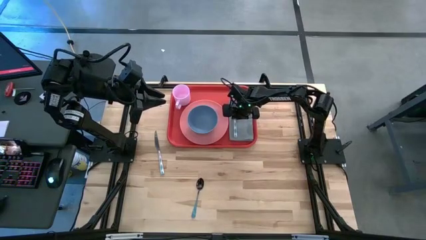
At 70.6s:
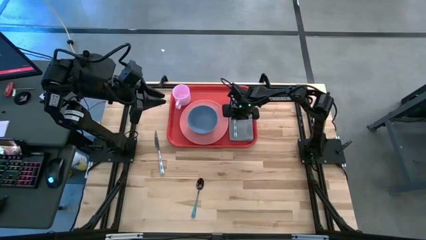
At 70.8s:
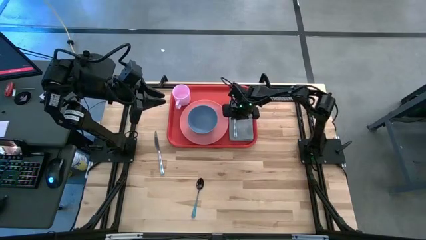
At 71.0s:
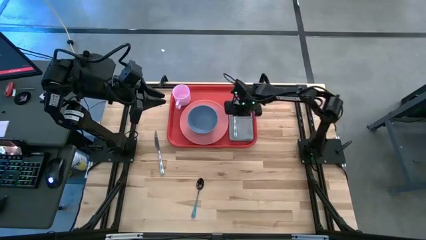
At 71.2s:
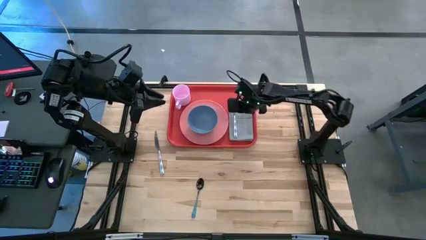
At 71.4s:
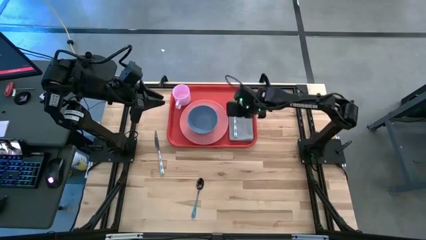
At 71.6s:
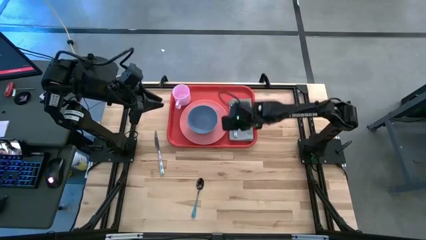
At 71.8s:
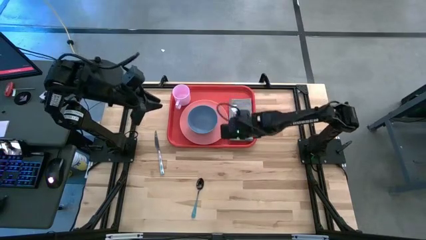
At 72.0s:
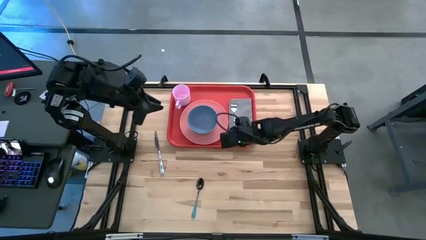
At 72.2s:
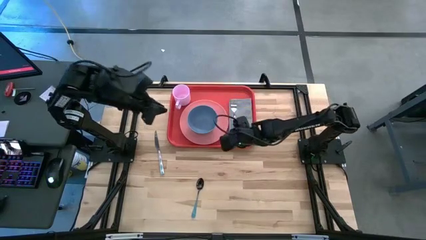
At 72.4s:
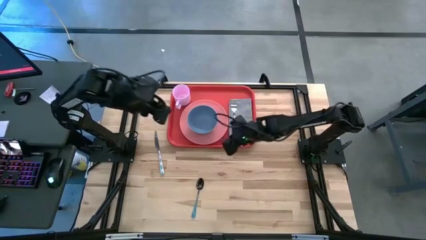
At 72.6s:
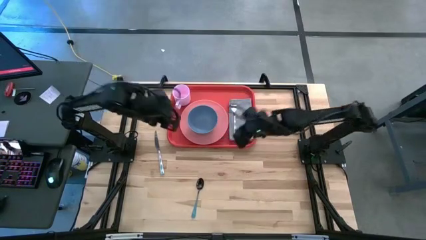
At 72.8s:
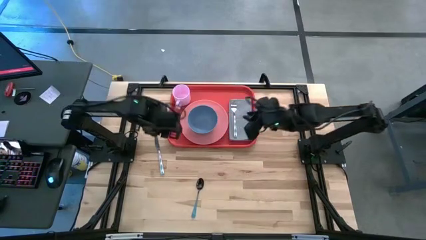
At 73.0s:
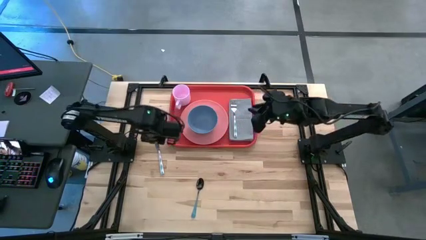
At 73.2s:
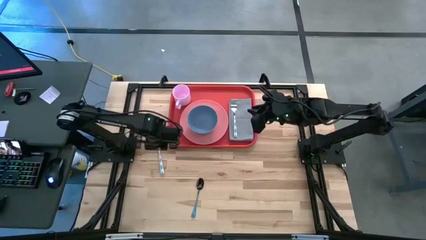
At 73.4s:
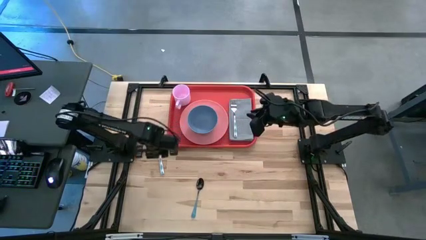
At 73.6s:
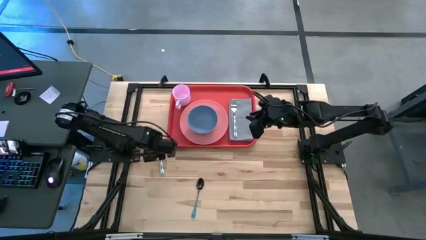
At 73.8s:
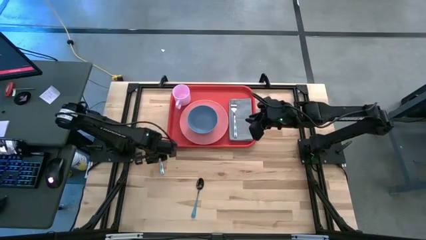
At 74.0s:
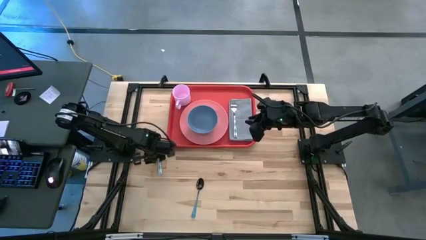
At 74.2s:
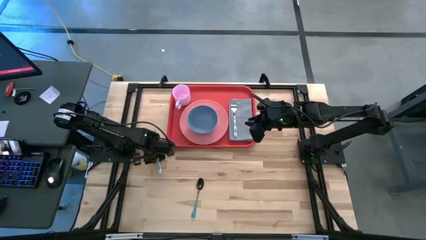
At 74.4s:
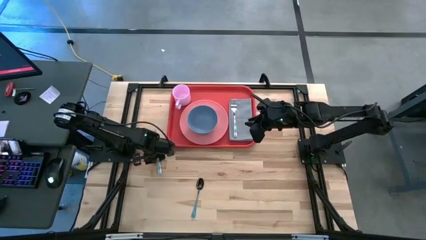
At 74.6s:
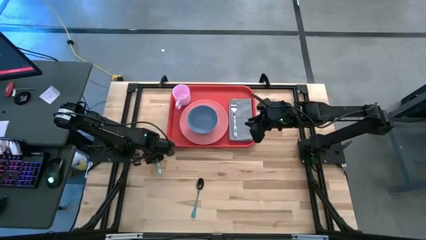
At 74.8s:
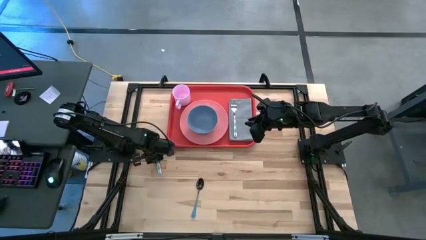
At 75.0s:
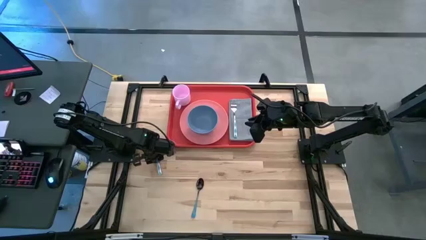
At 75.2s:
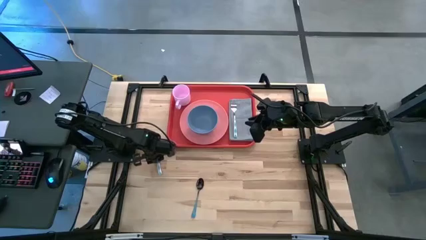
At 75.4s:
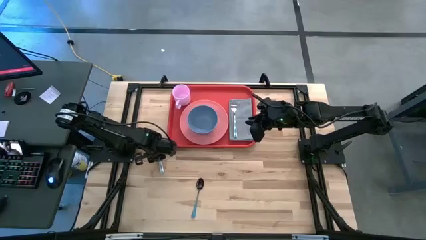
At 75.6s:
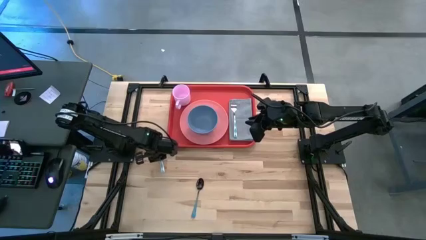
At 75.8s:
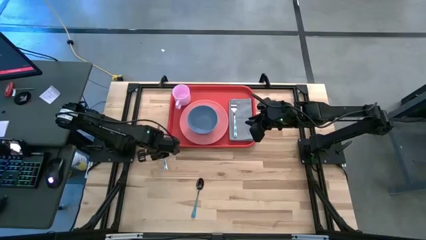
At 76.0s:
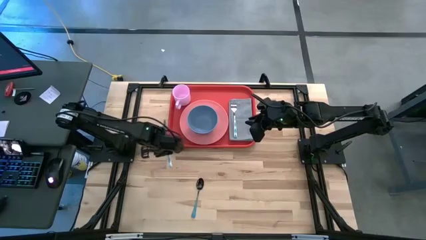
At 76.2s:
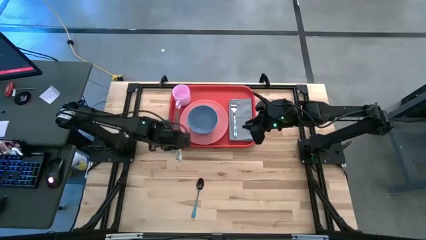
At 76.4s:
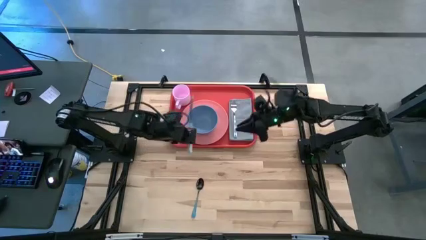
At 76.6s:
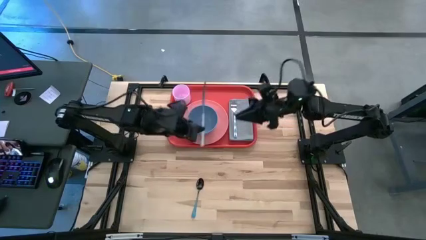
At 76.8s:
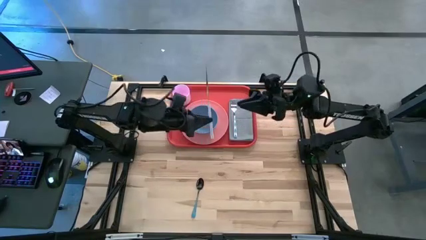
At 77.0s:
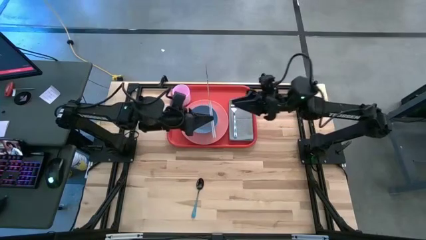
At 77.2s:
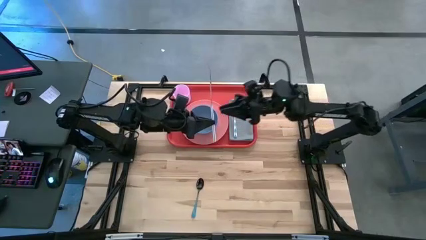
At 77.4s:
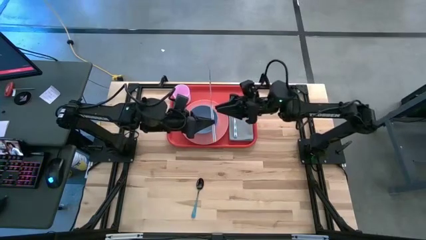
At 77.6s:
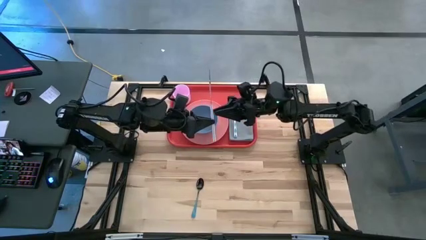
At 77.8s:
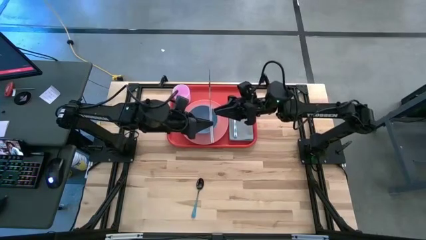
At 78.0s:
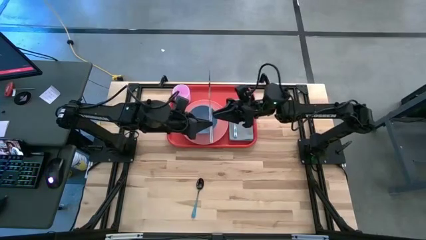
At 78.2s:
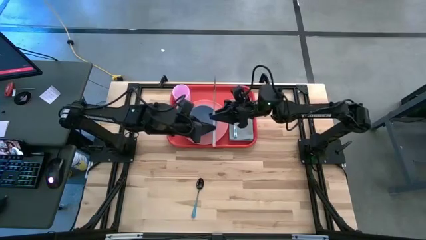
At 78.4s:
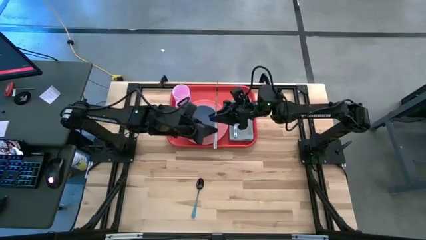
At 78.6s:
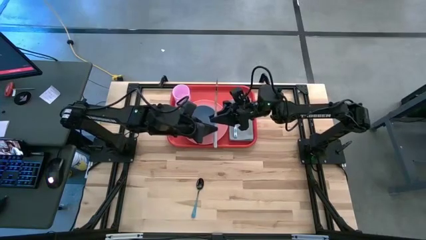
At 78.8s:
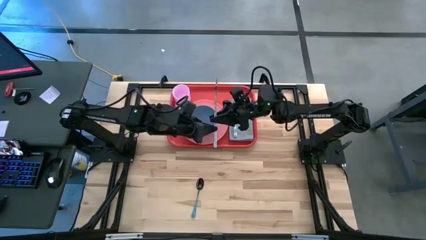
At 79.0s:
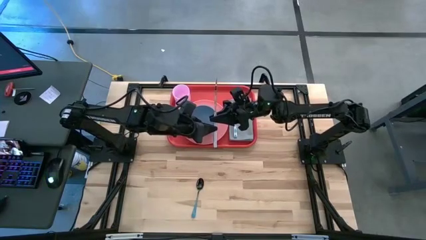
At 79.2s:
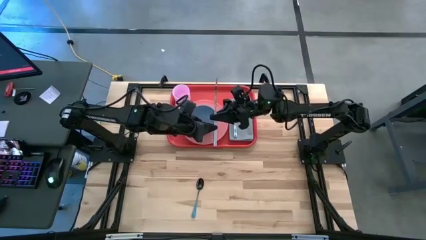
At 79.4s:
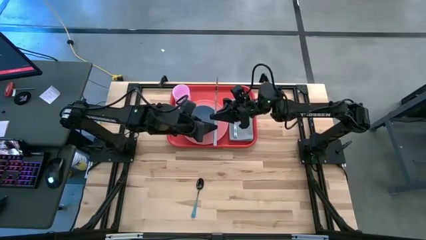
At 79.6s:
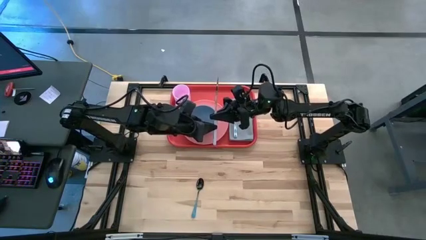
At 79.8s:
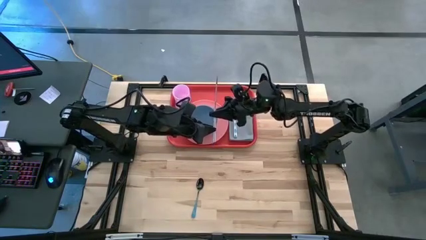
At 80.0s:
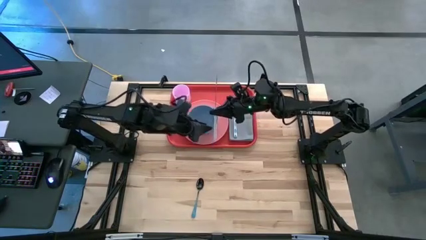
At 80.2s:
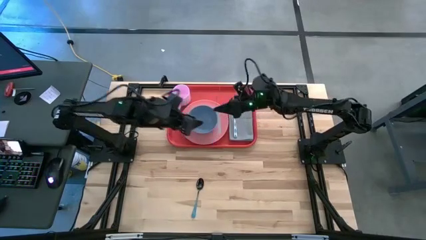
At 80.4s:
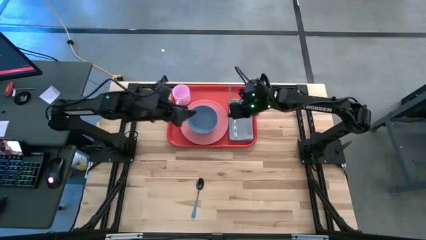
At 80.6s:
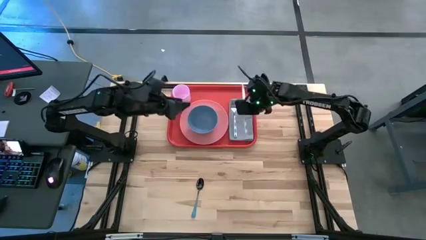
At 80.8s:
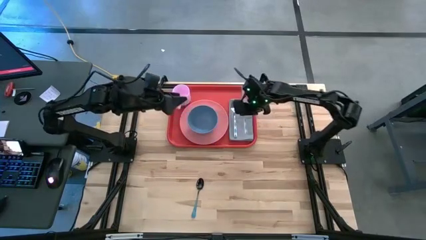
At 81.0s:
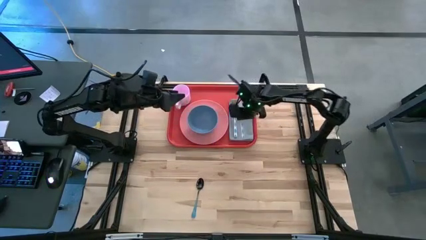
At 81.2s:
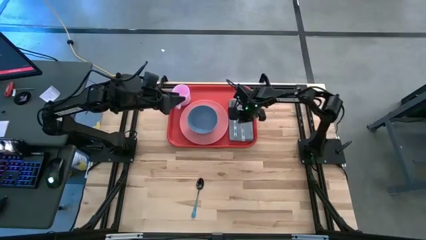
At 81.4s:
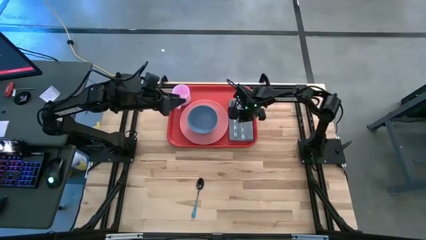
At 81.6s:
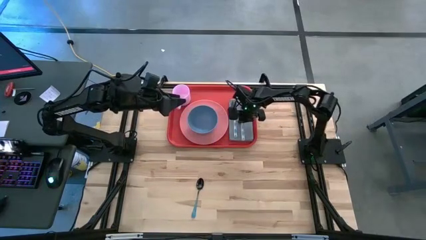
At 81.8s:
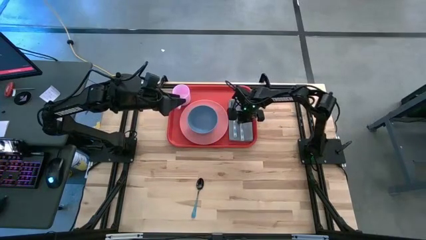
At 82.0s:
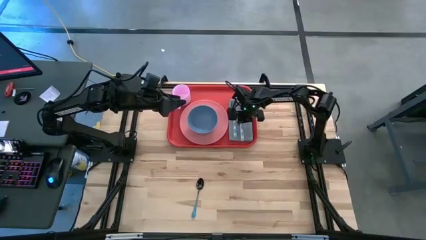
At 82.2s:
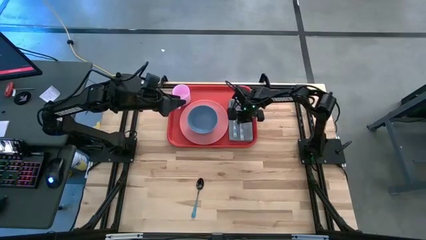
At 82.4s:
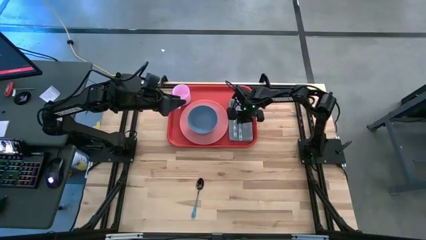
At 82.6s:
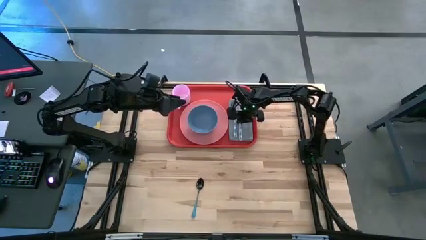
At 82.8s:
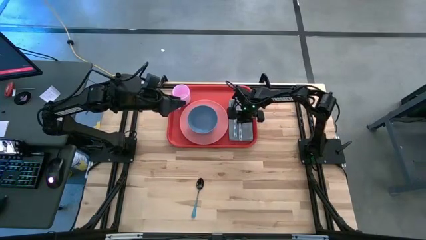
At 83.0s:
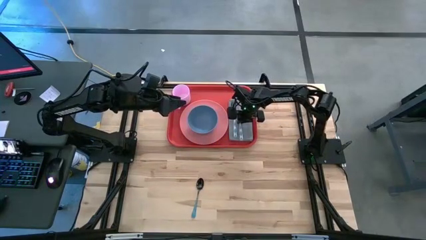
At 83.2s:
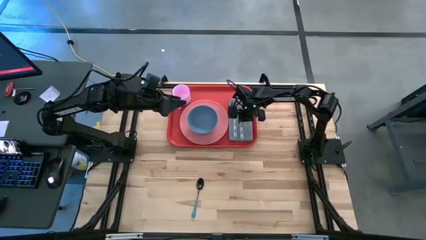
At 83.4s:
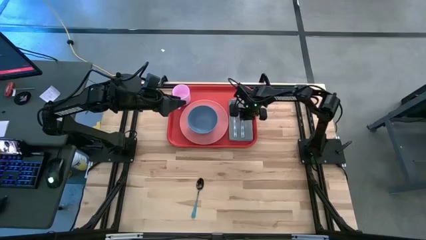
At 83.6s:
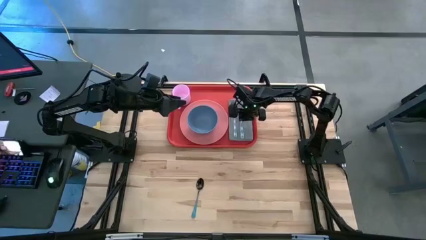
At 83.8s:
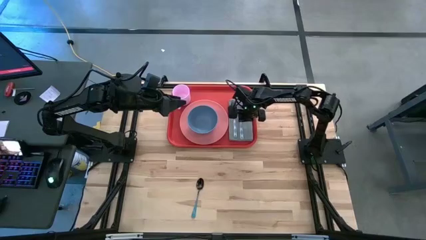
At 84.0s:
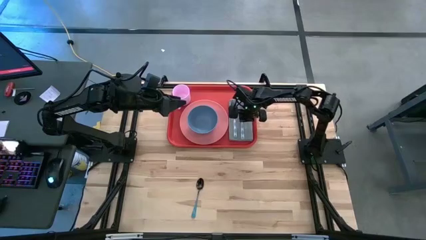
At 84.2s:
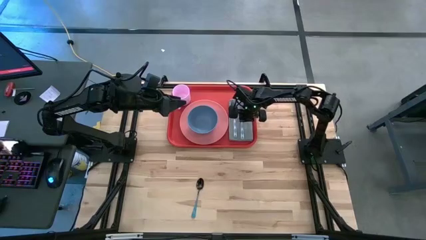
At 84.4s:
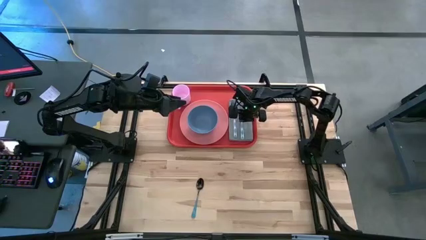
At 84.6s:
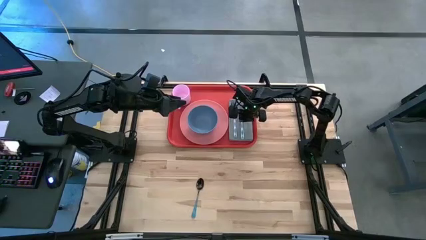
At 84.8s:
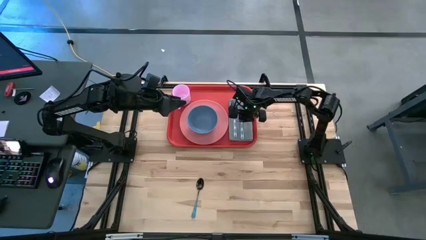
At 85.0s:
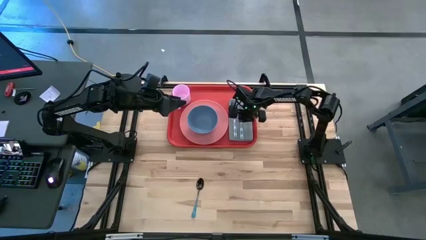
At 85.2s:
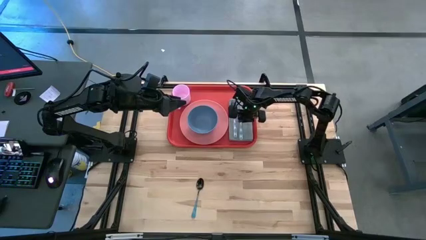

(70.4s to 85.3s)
Task: Set up tray
Put the blue knife on the gray napkin to the right of the blue fork

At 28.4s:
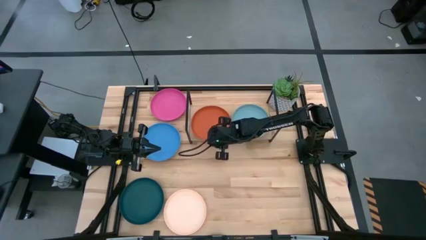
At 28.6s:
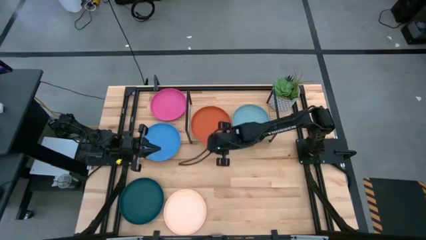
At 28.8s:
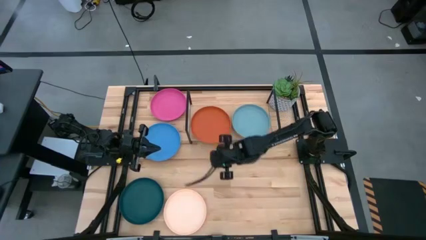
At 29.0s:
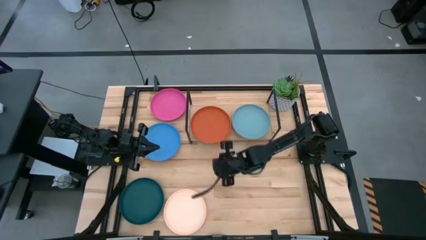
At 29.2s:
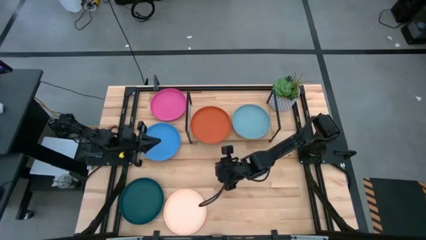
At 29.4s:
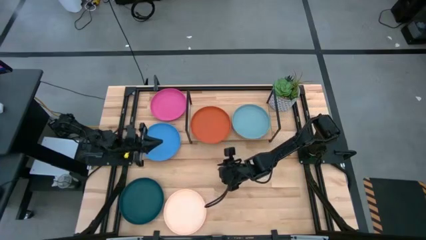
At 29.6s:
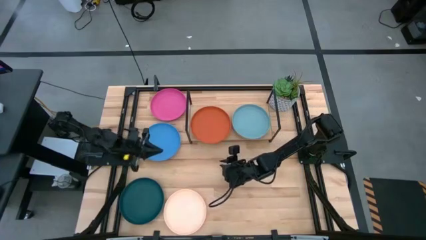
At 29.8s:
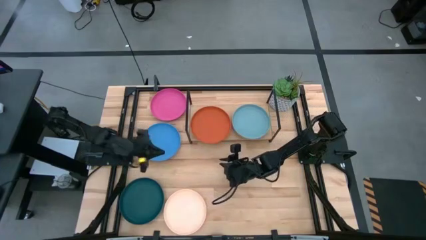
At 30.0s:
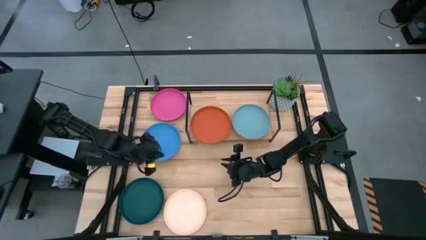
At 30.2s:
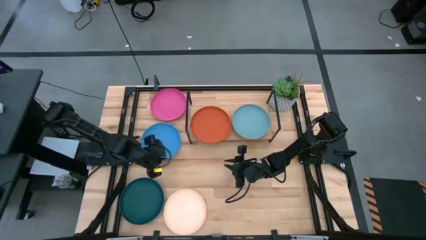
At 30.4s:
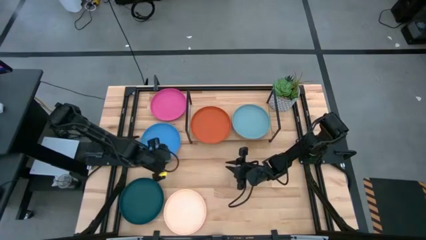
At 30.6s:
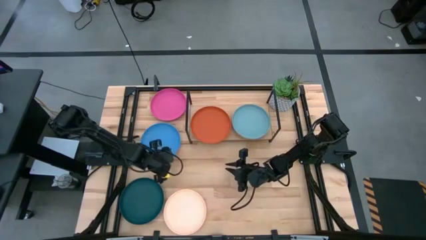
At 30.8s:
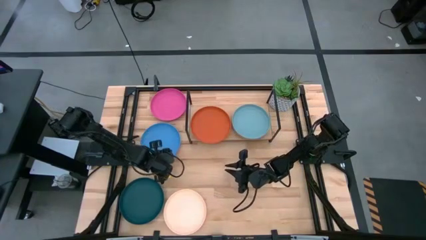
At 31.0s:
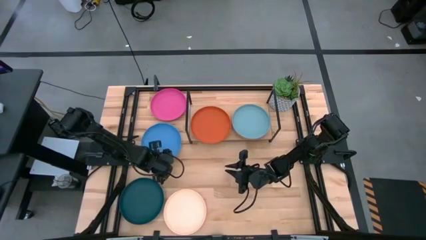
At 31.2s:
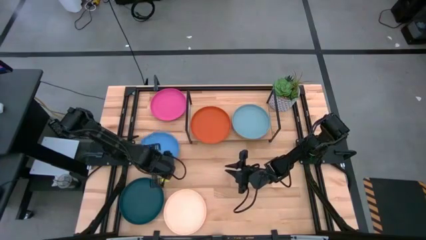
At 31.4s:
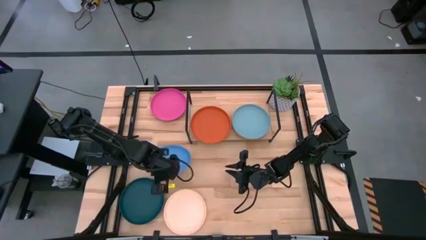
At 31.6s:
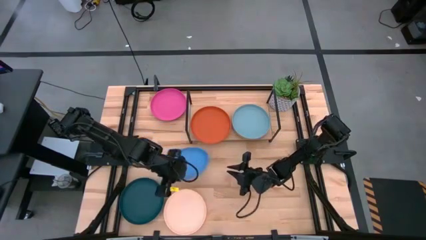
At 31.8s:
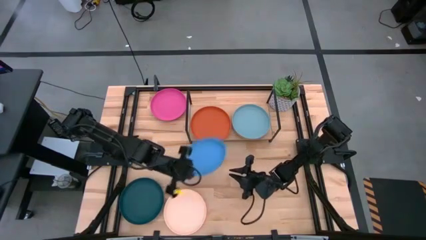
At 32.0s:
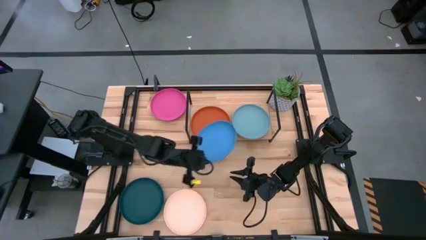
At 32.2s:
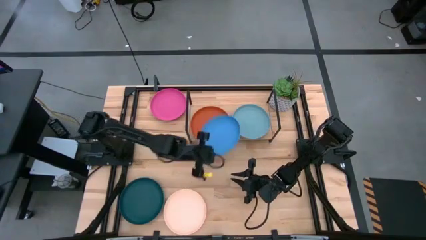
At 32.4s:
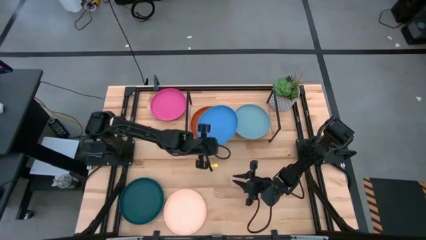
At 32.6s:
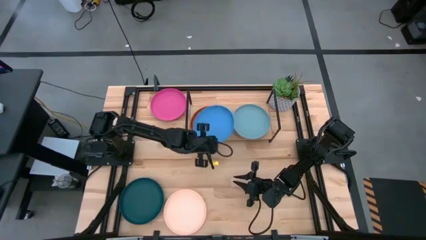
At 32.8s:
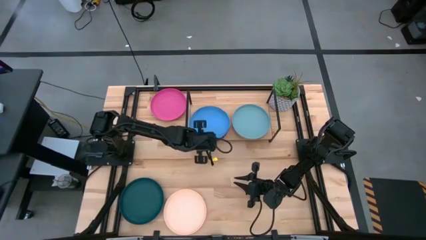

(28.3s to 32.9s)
Task: Place and stack plates onto a shelf
Stack the blue plate on top of the orange plate on the shelf
